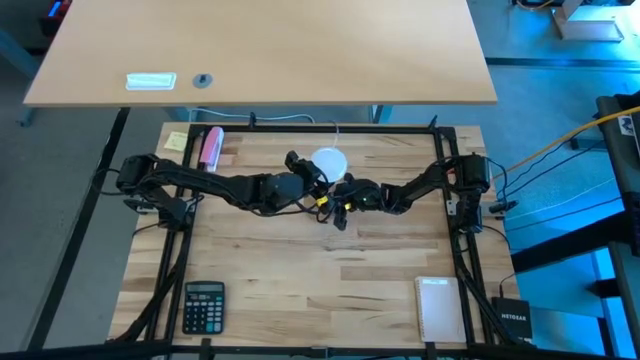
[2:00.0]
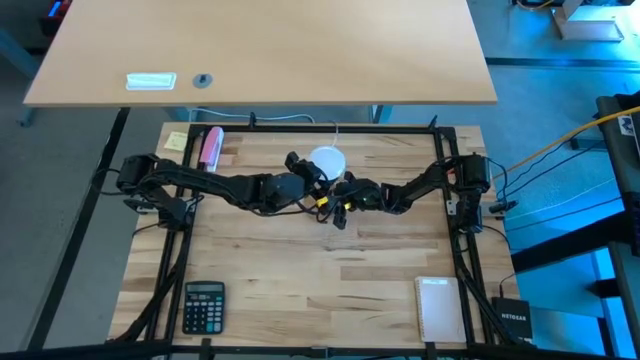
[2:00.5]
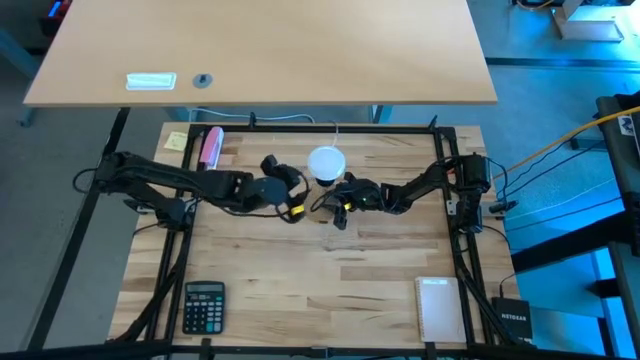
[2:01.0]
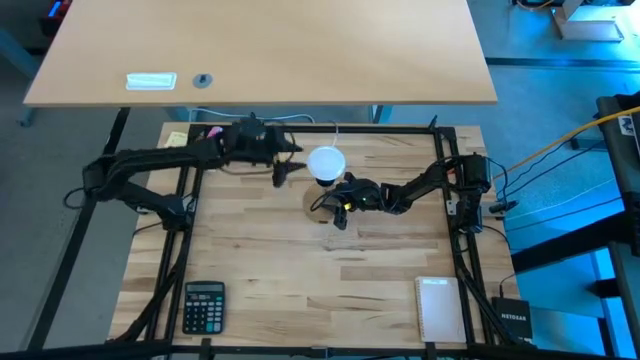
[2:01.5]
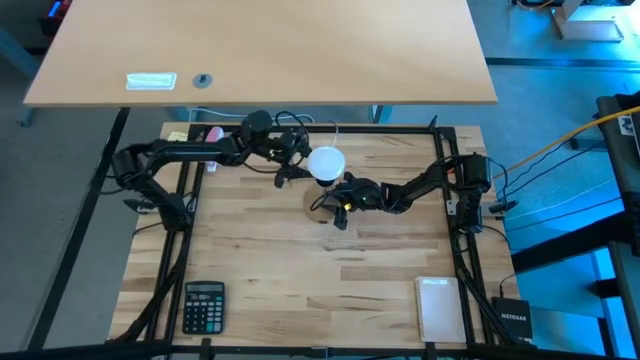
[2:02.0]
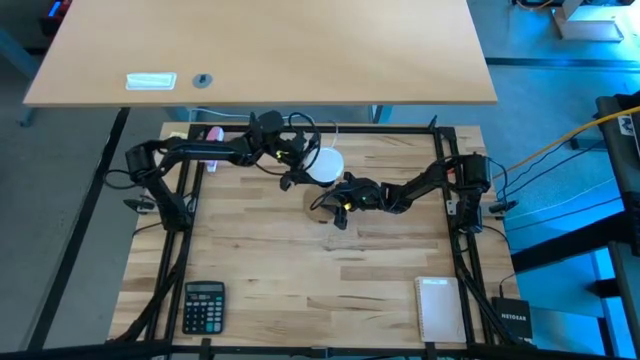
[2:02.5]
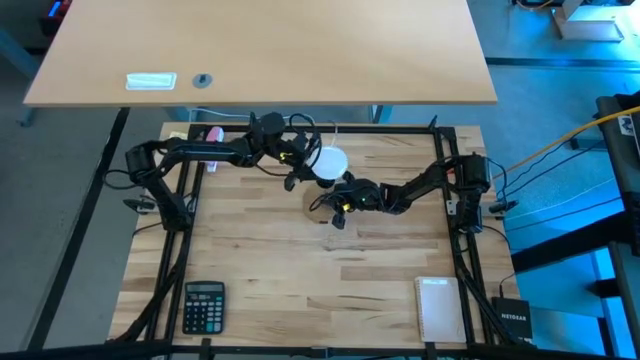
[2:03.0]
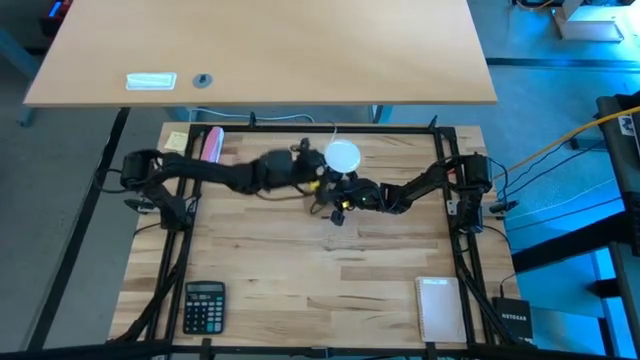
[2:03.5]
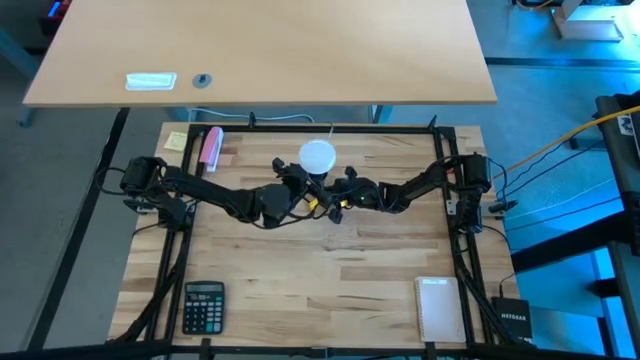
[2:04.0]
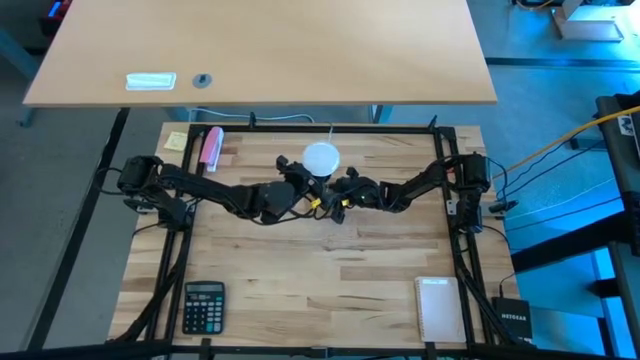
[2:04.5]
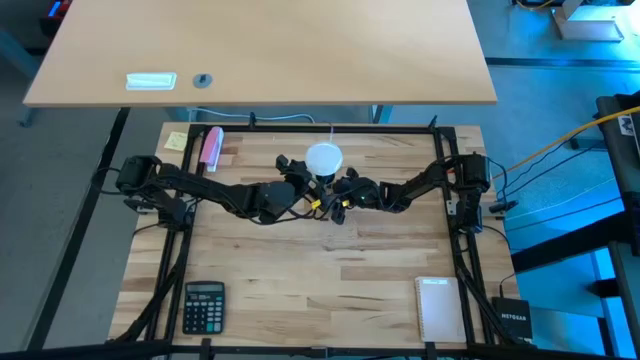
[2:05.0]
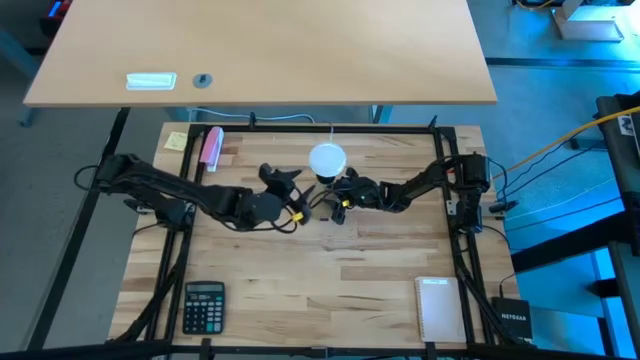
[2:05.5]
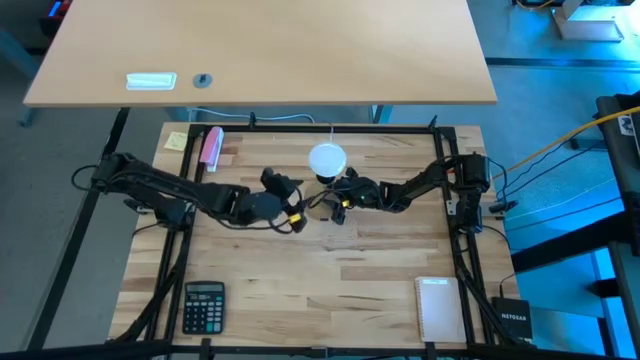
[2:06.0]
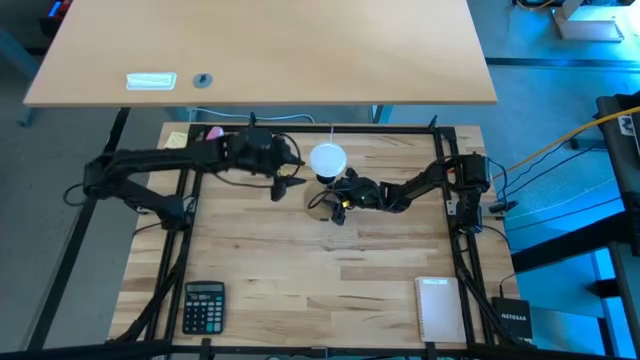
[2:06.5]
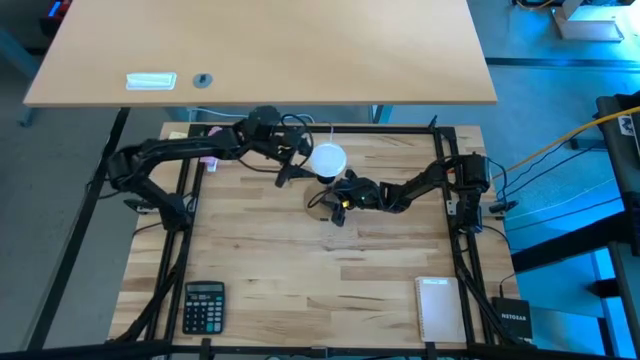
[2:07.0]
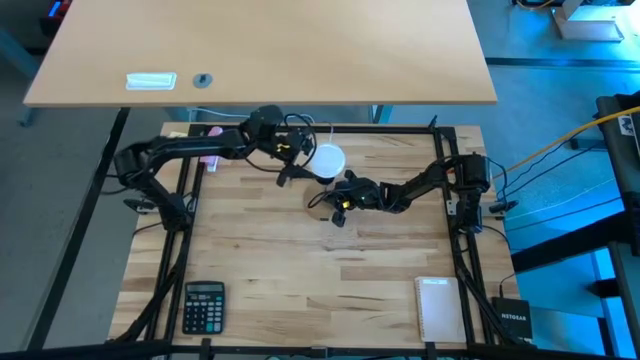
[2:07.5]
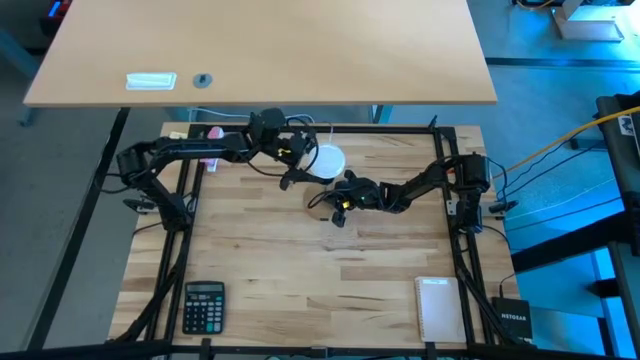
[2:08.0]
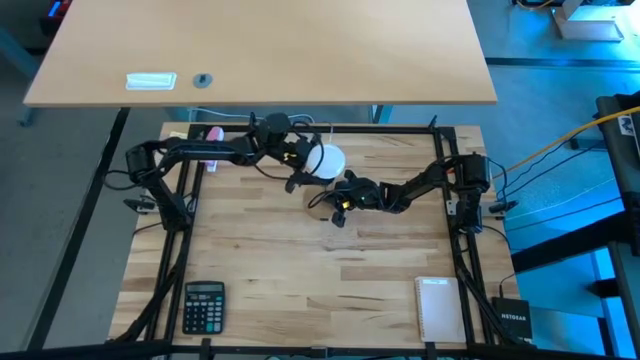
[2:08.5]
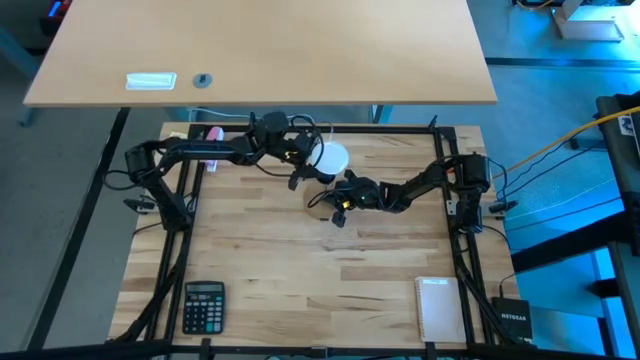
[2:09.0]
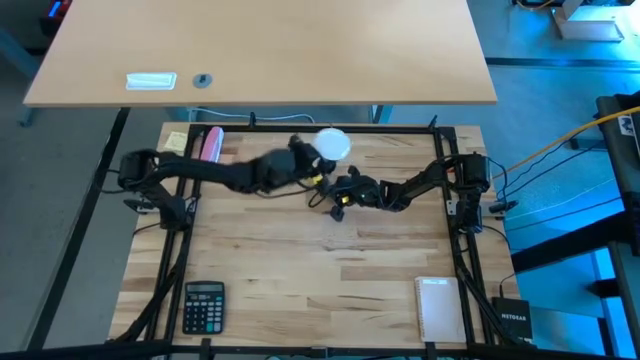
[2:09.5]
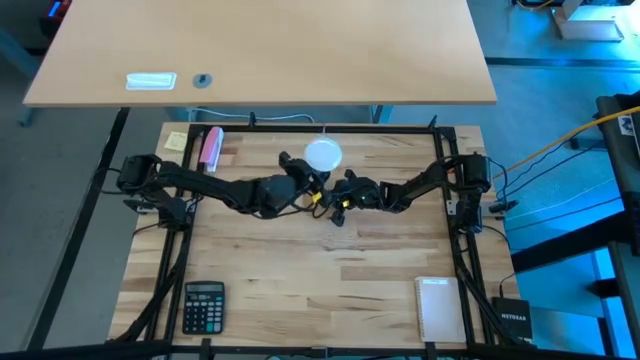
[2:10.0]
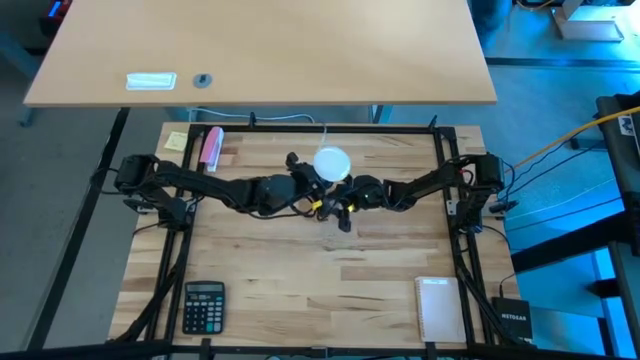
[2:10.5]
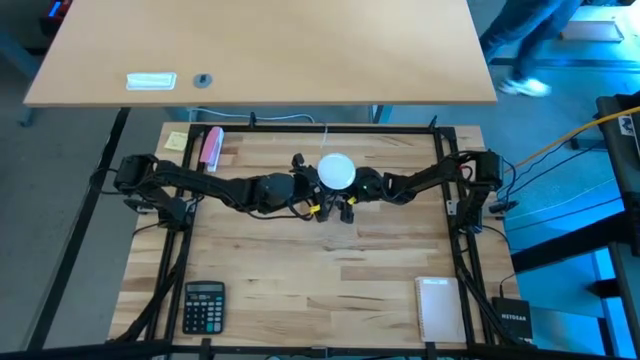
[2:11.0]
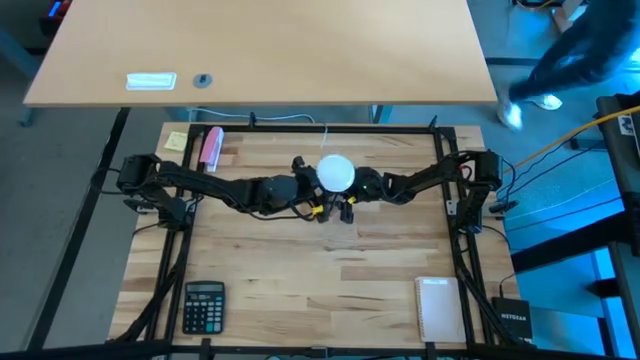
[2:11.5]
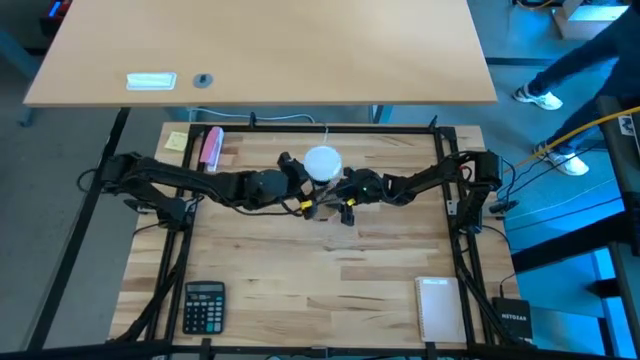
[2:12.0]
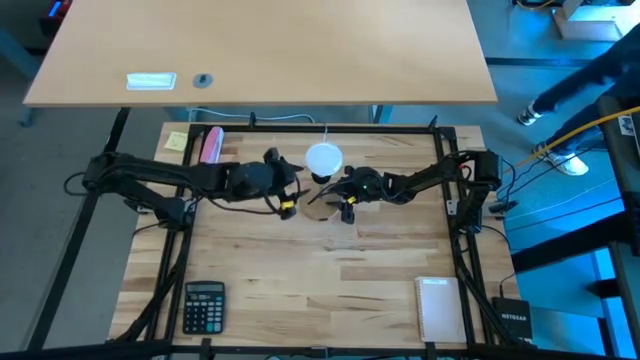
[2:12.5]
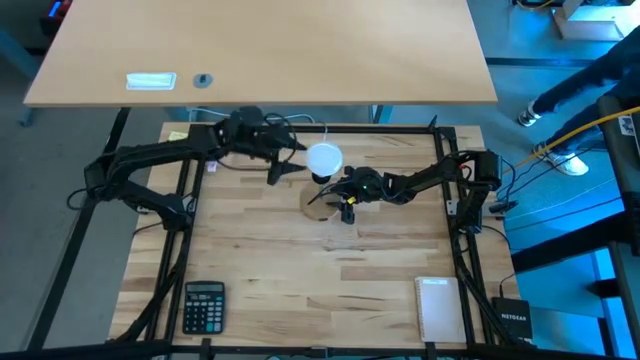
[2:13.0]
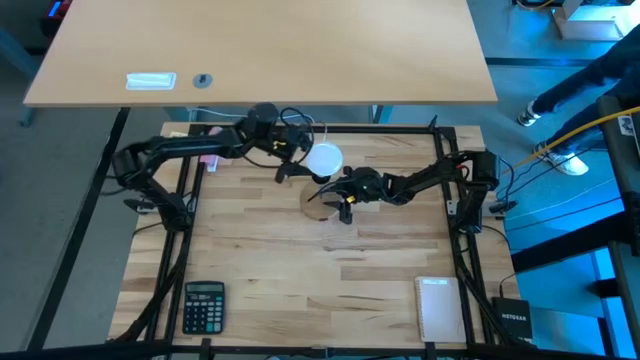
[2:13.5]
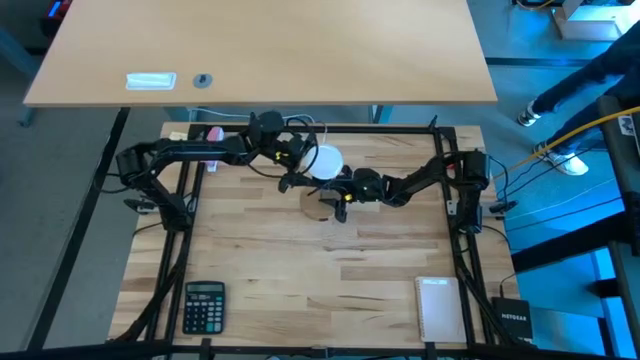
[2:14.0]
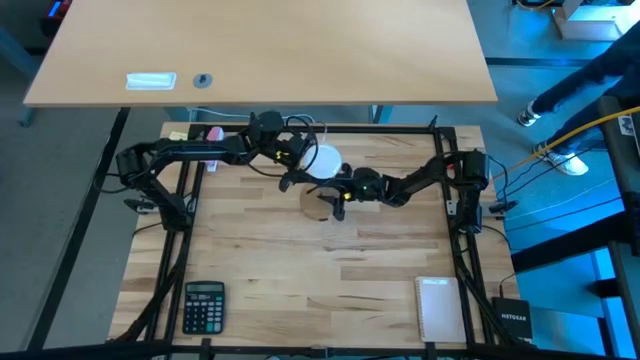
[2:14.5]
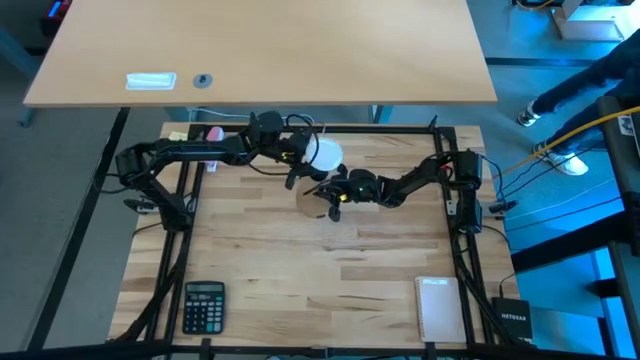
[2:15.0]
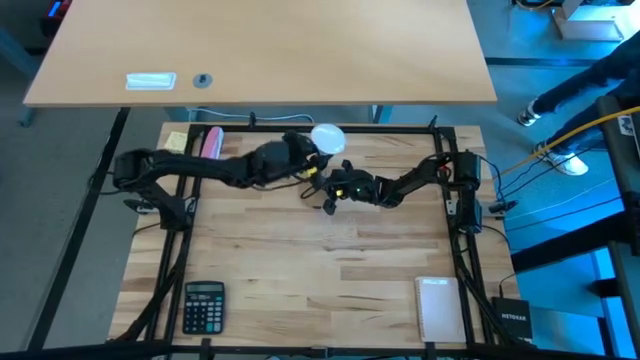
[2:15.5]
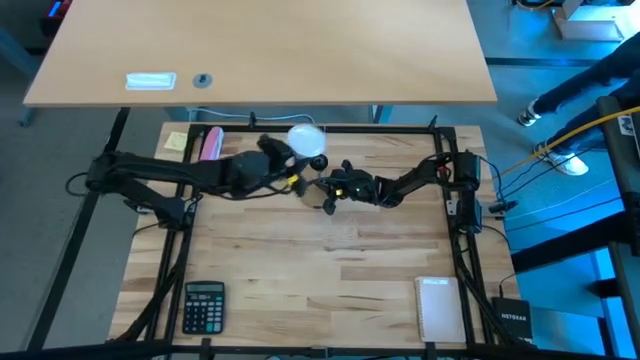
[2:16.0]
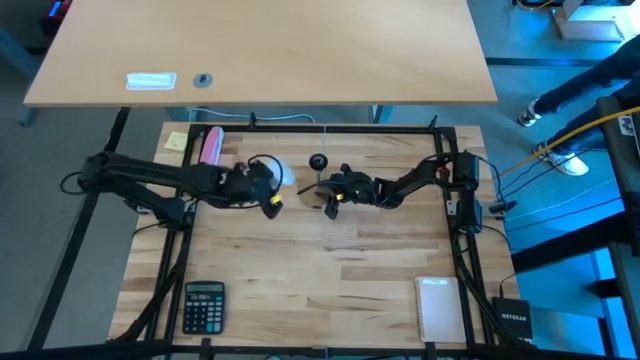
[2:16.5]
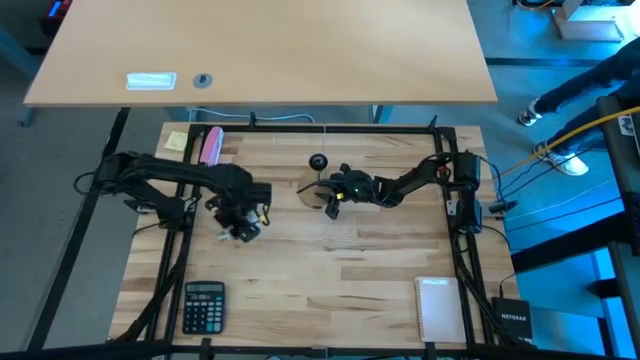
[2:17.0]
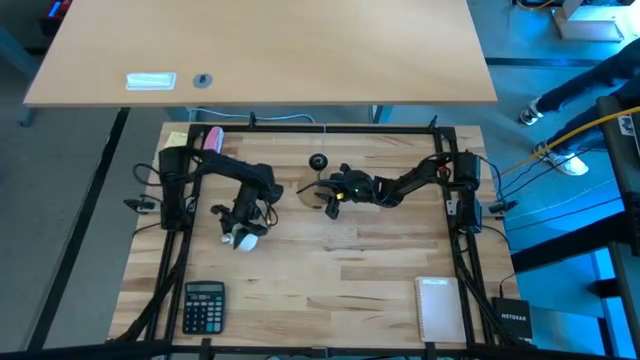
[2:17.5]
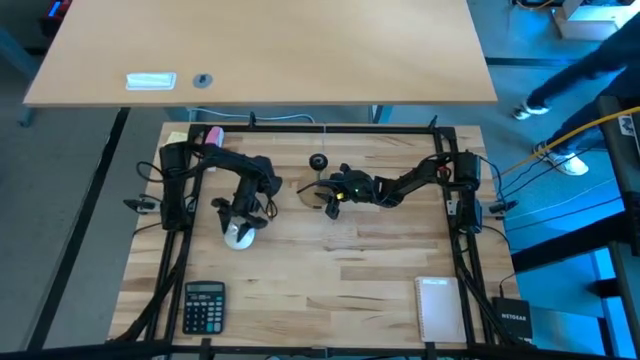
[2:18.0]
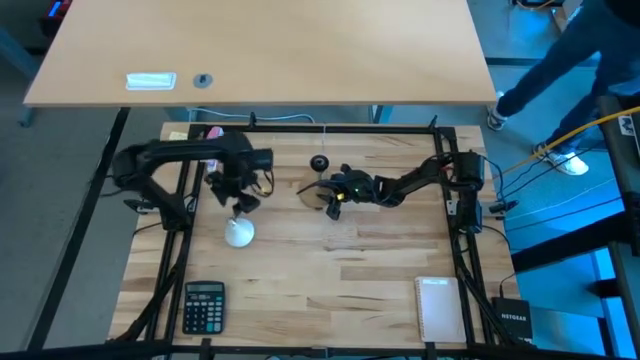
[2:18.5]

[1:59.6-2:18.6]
Task: Screw lightbulb
Remove the white lightbulb from the lamp

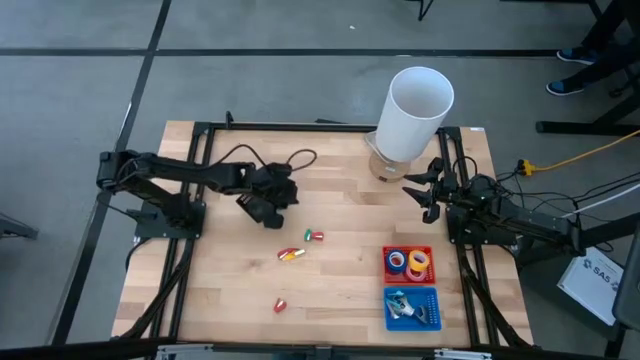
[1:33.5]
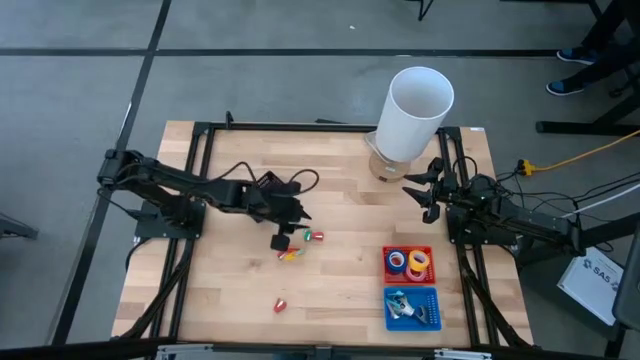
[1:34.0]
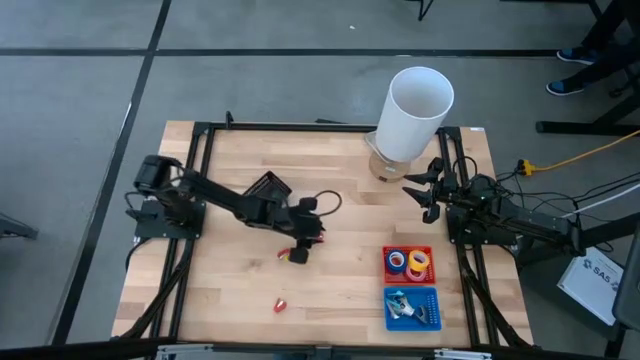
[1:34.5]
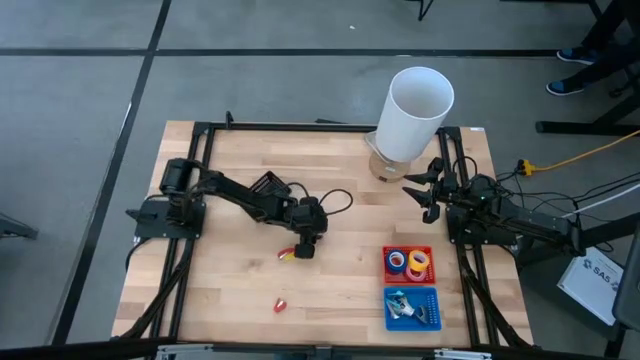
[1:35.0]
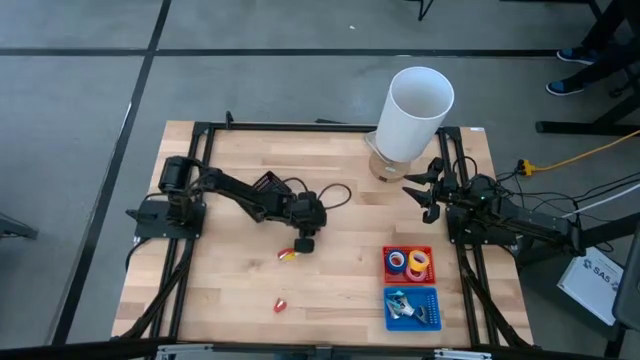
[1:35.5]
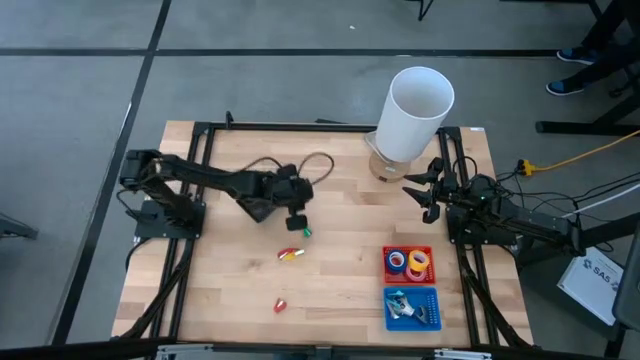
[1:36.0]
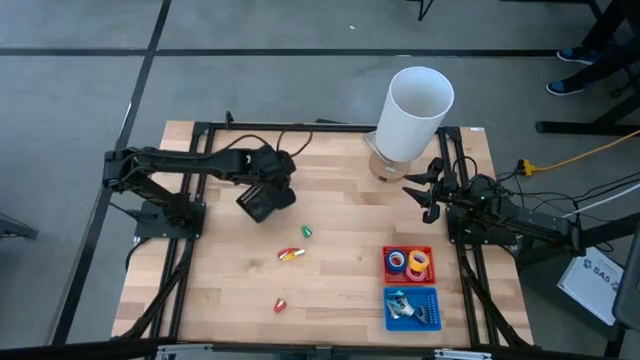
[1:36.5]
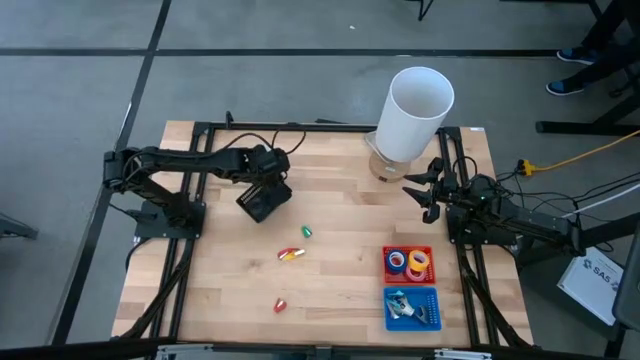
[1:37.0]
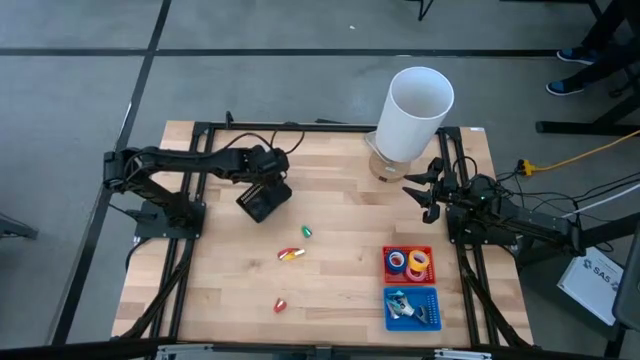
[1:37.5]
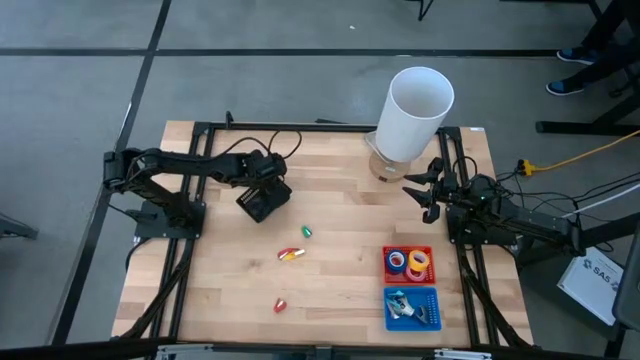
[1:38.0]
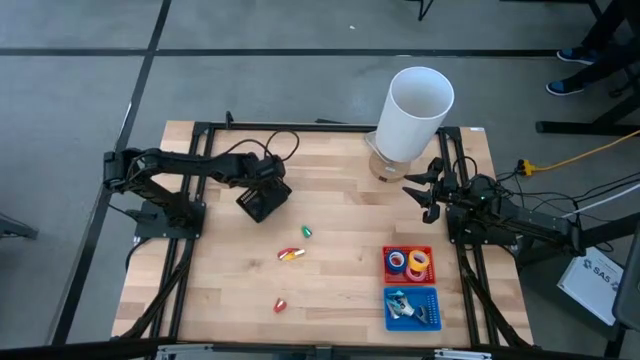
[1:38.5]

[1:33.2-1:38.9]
Task: Pick and place Stapler, Stapler remover, tape
Put the red stapler into the black basket
